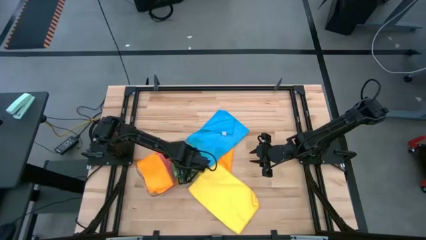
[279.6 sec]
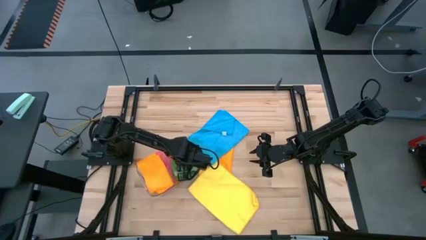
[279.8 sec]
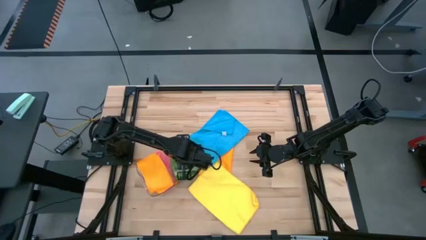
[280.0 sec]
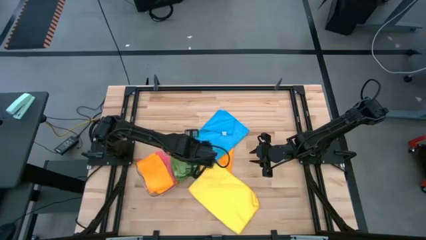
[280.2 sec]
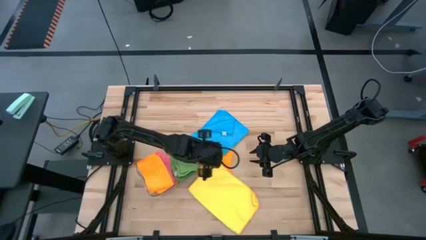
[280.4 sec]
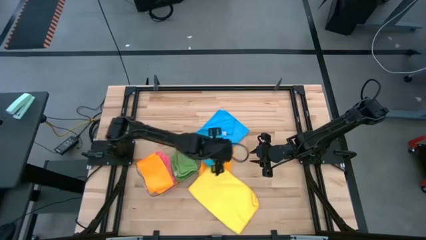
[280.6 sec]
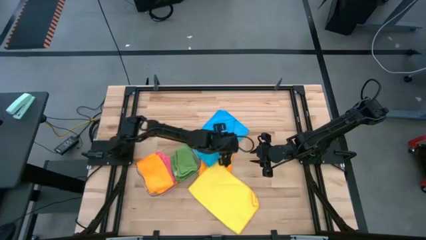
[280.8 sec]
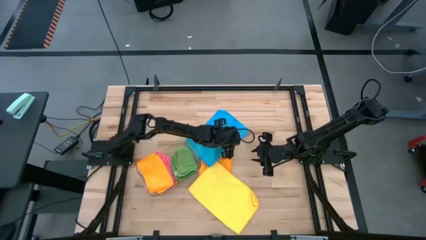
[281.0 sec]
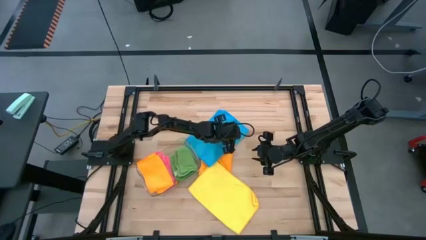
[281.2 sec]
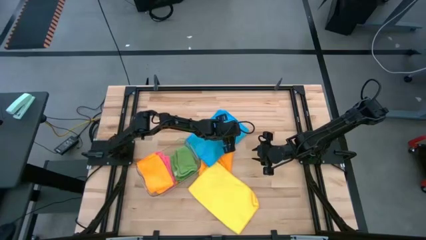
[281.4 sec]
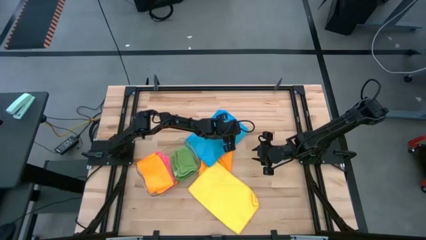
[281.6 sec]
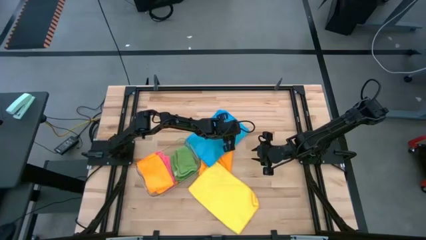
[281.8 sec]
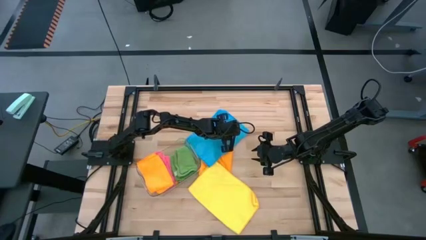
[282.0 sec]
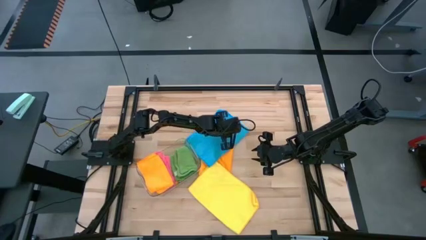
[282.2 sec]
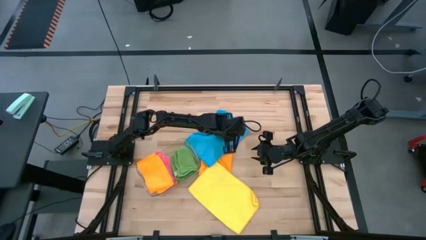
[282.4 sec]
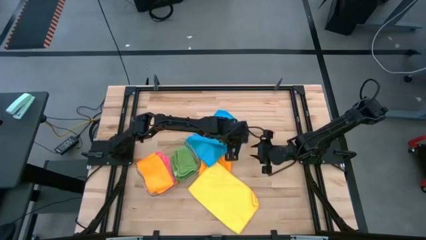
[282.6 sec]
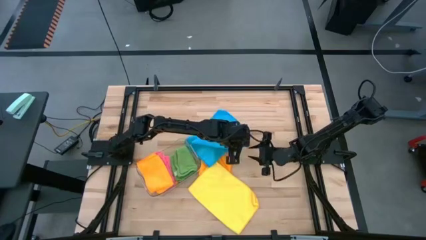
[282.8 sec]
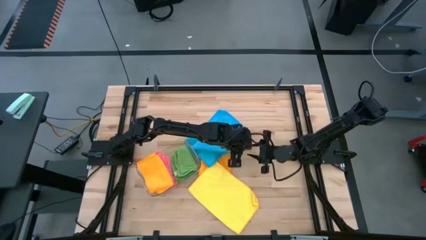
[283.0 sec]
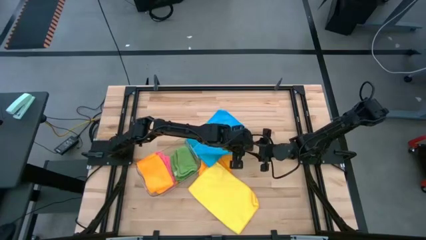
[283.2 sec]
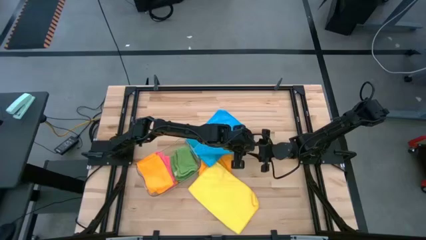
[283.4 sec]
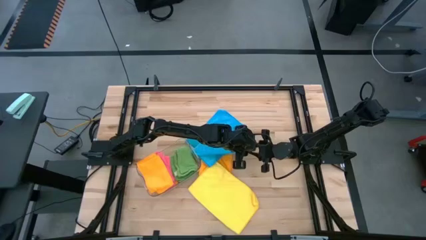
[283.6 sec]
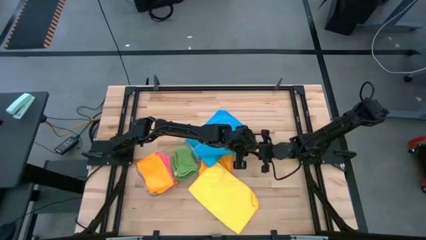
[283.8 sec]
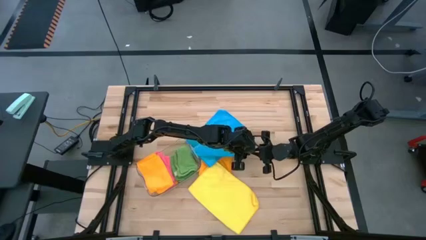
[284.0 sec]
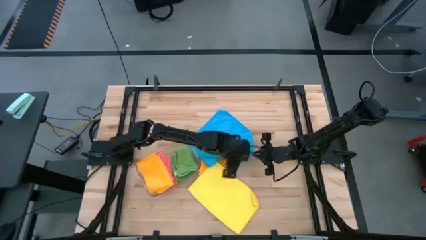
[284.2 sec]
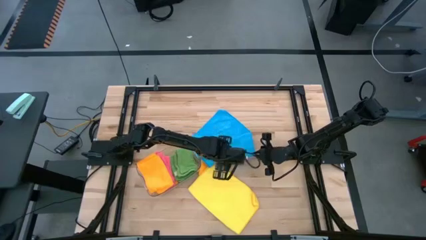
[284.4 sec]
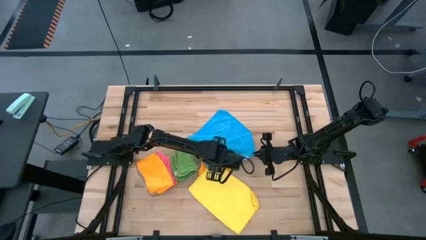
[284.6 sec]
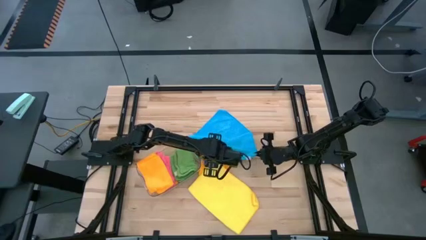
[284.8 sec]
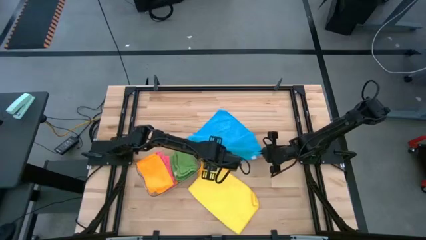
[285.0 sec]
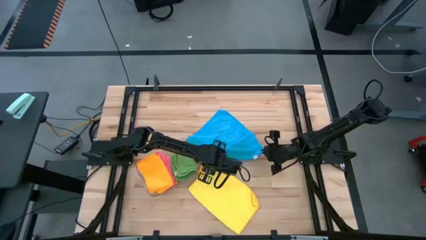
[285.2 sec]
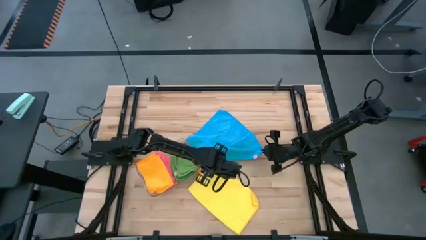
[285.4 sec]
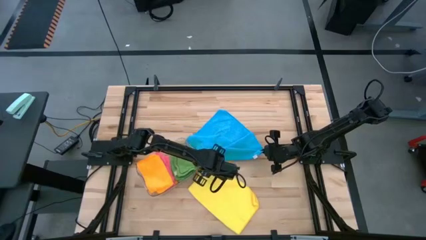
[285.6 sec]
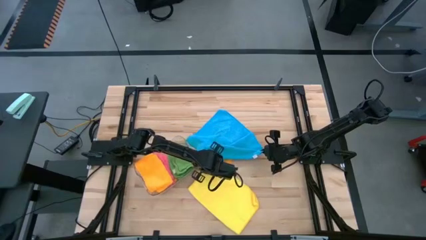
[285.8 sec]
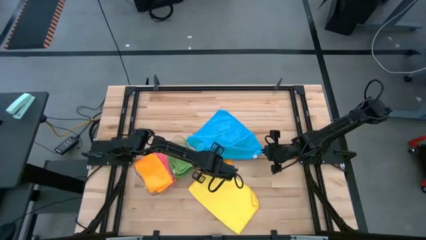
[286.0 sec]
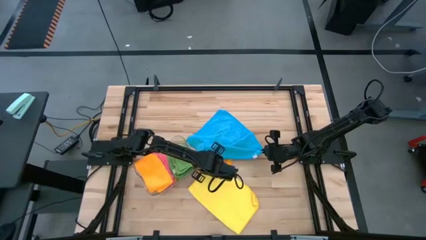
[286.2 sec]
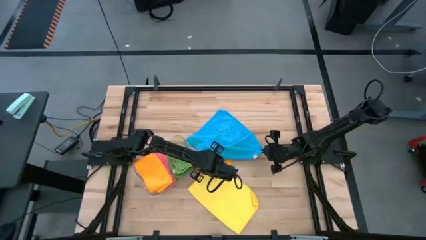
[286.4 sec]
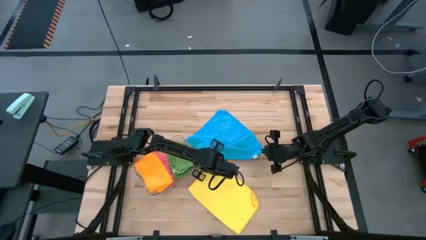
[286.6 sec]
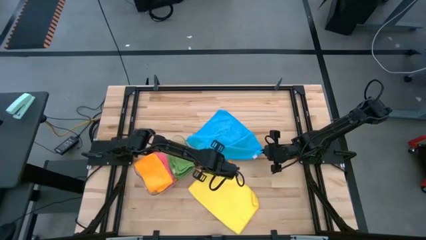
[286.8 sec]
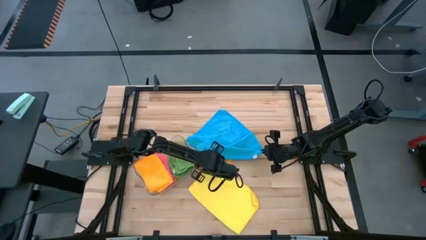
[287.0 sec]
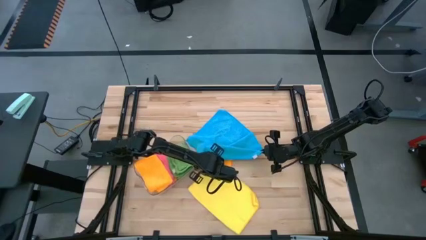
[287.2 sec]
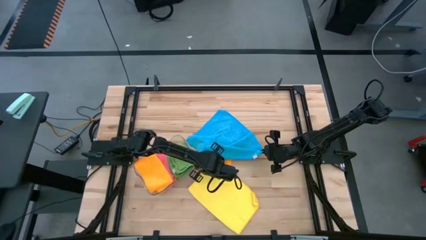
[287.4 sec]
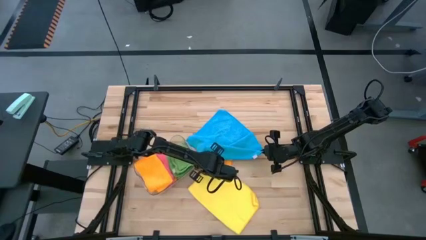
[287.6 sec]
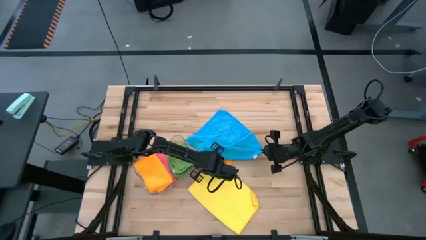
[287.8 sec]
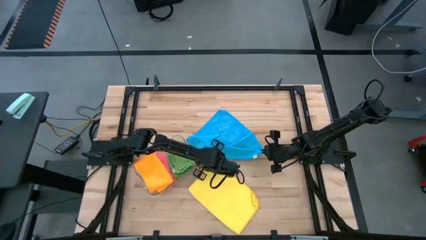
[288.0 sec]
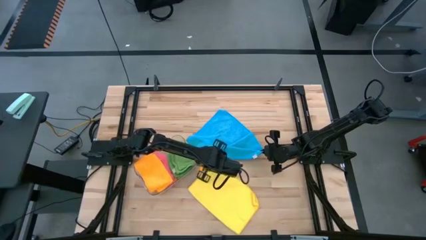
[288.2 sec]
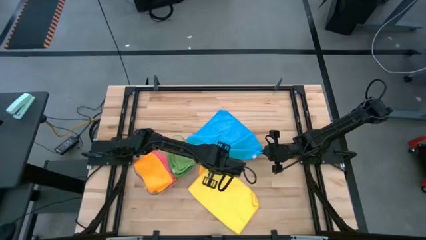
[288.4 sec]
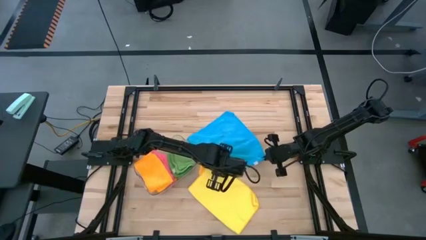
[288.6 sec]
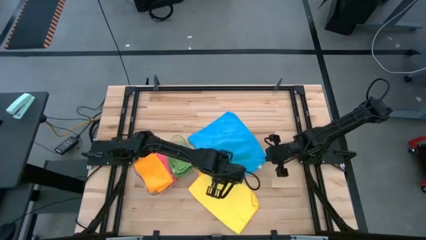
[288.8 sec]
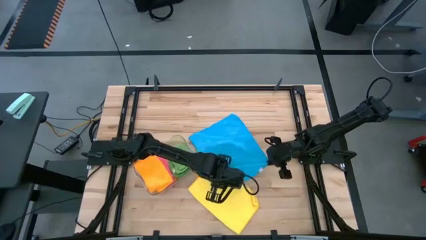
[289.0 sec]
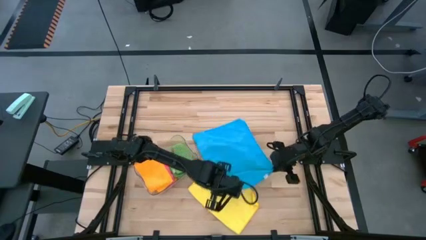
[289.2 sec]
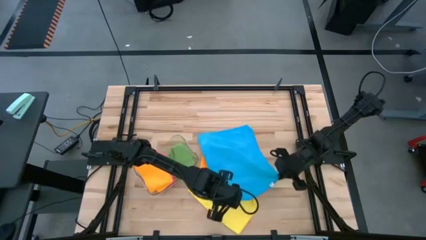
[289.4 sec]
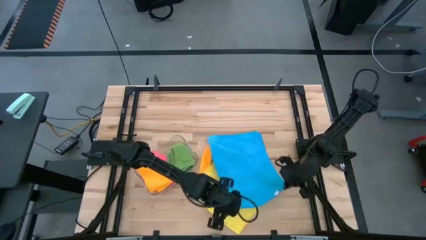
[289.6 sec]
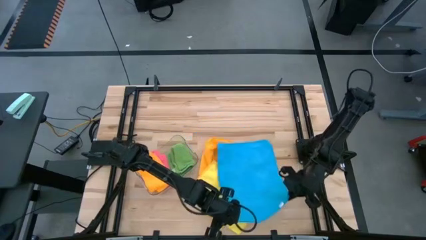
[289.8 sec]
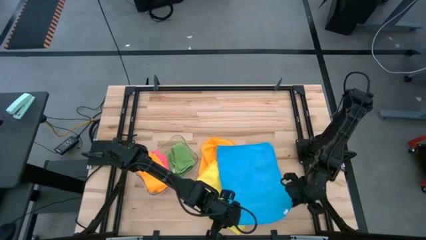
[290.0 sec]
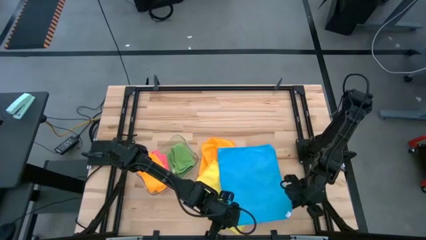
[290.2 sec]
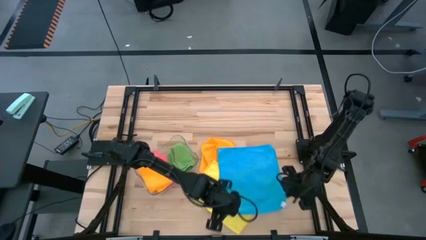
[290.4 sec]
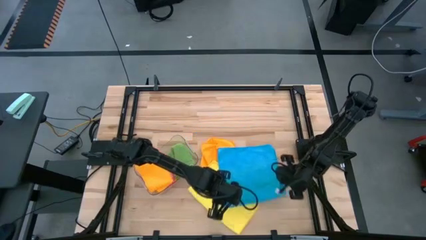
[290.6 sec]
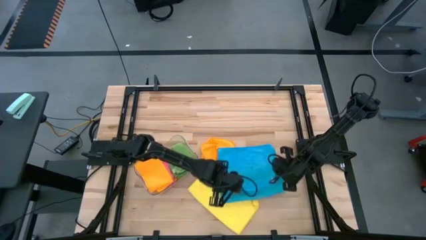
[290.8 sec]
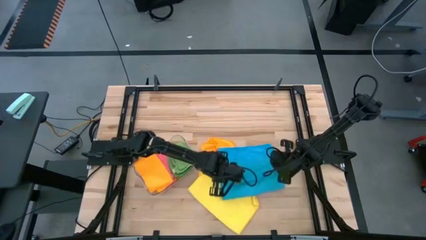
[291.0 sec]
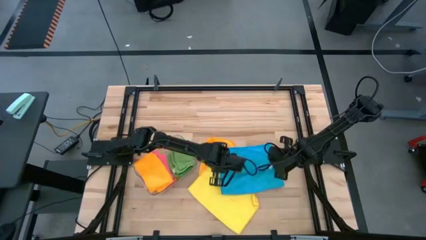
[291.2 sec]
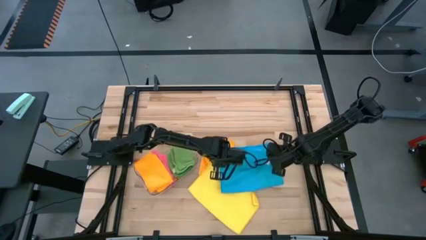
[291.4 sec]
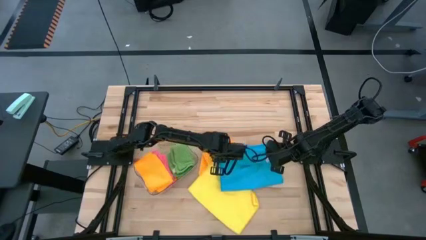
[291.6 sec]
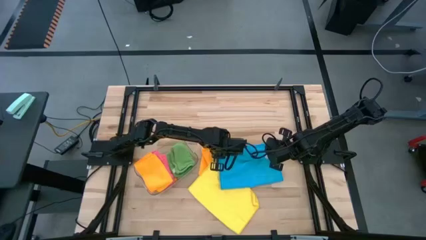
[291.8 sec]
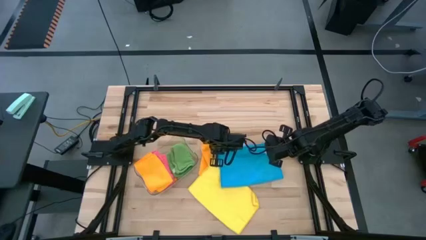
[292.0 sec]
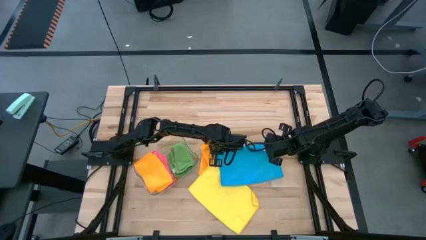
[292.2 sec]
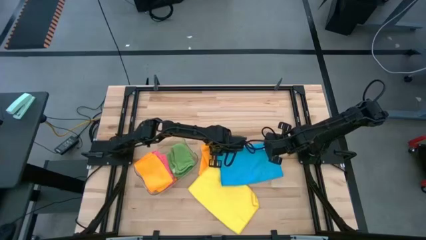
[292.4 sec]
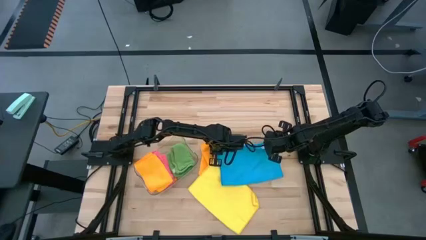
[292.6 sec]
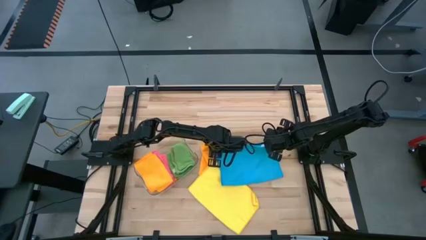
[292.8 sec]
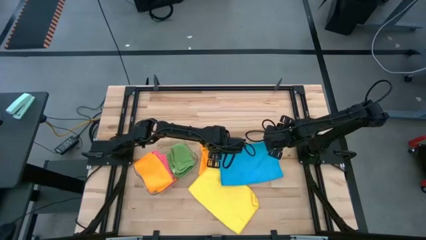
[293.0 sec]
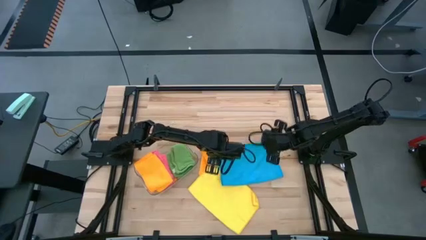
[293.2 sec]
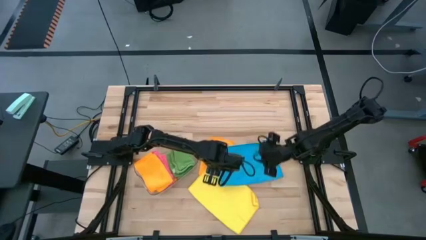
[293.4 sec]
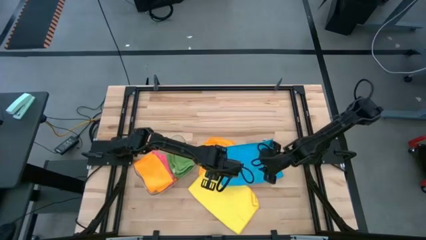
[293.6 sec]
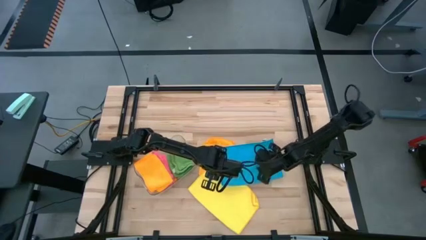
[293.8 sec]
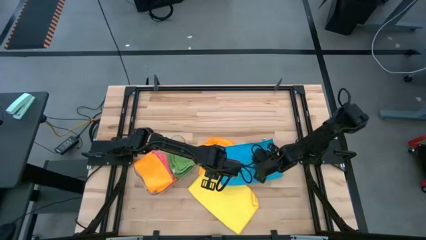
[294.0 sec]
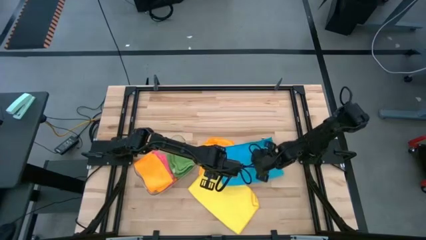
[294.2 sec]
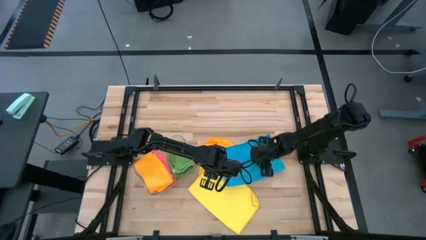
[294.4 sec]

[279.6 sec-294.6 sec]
Task: Fold microfiber towels
Fold the blue microfiber cloth
